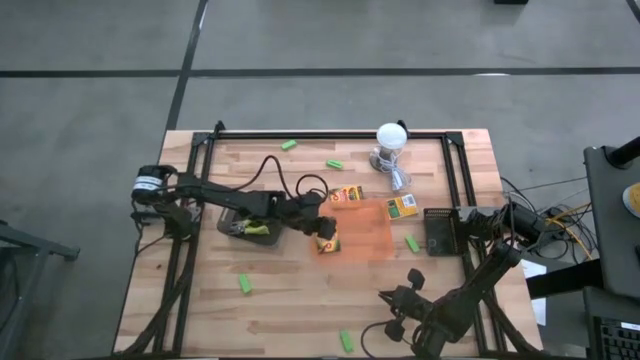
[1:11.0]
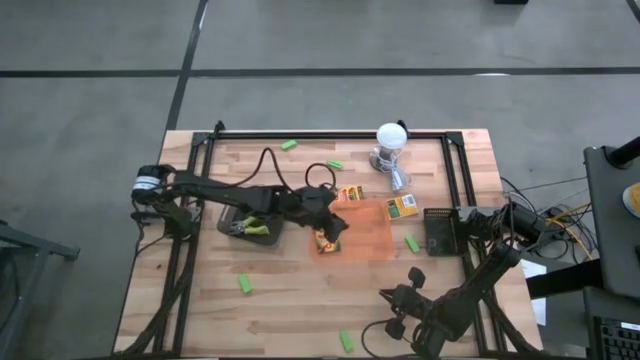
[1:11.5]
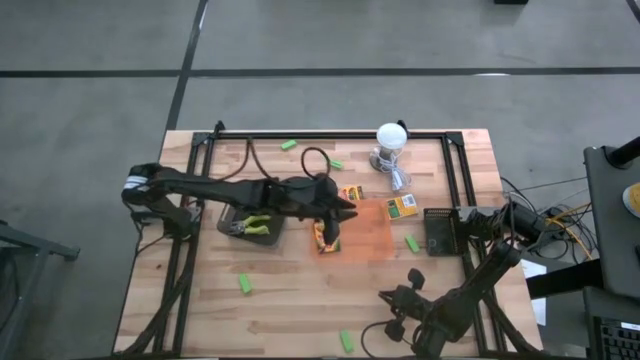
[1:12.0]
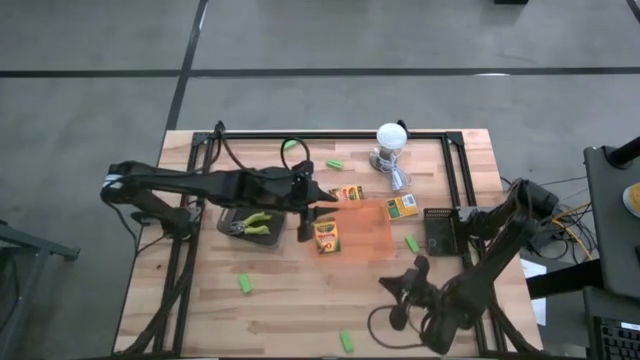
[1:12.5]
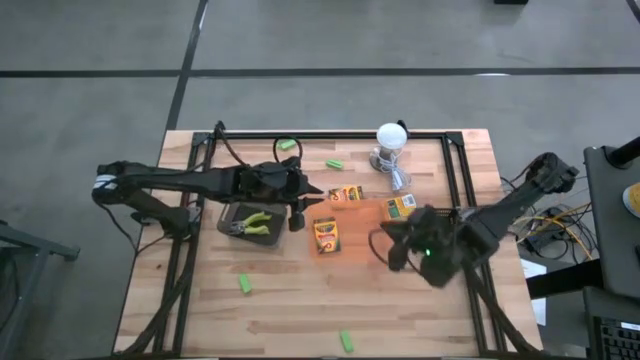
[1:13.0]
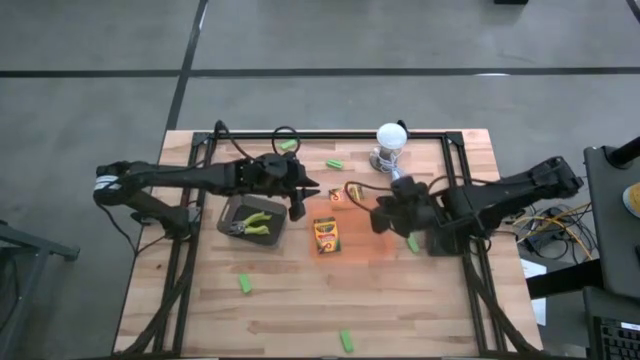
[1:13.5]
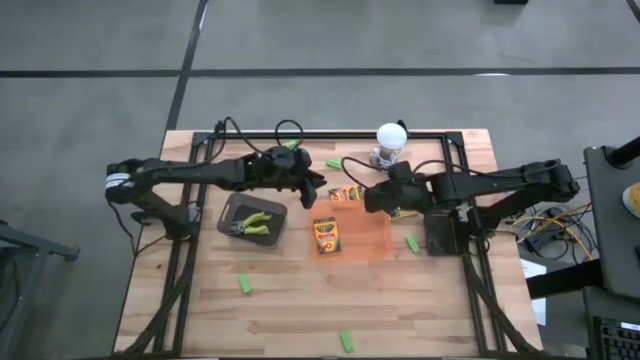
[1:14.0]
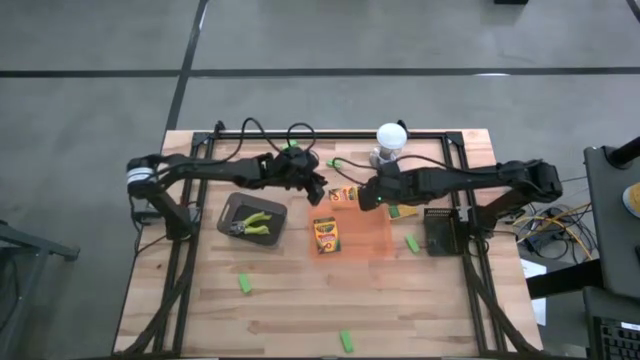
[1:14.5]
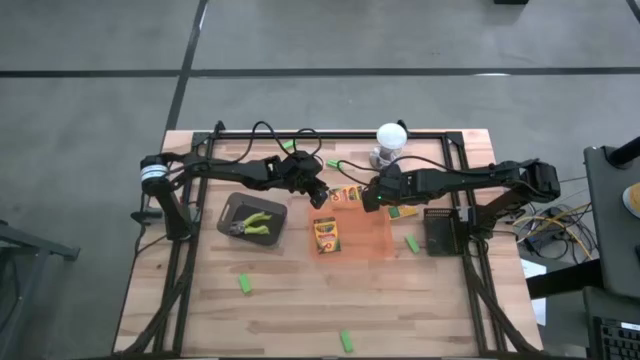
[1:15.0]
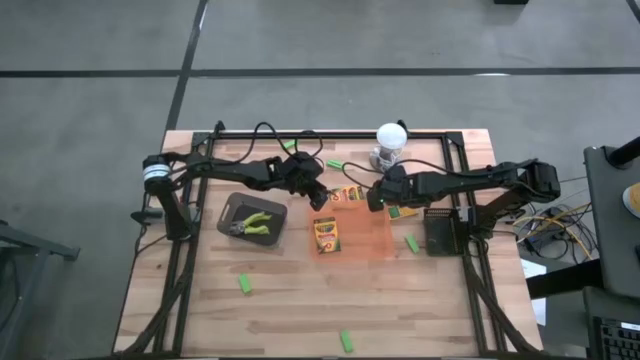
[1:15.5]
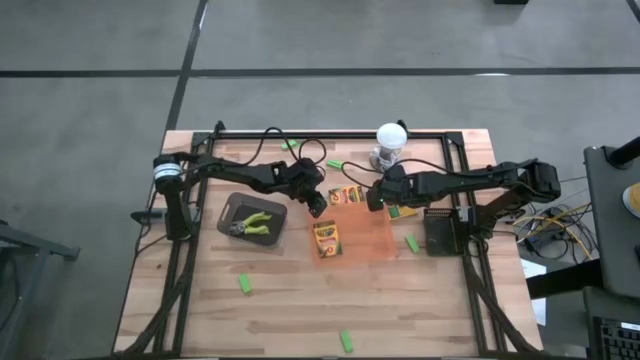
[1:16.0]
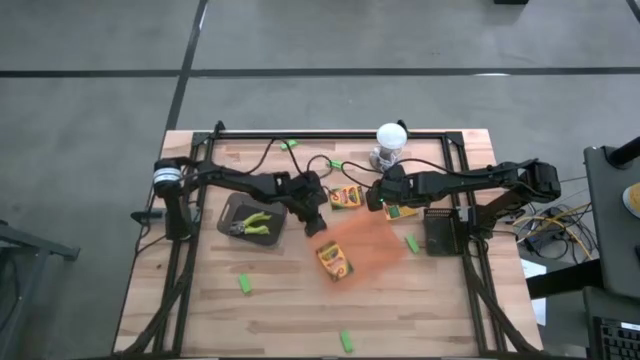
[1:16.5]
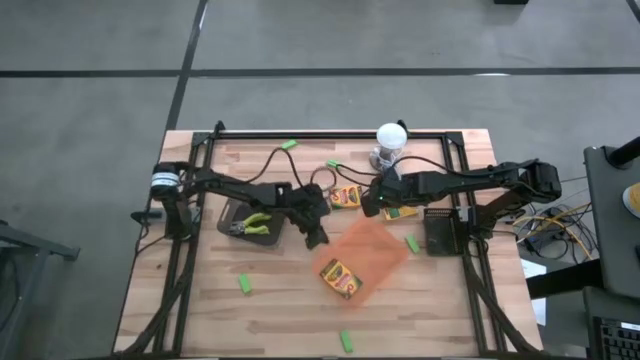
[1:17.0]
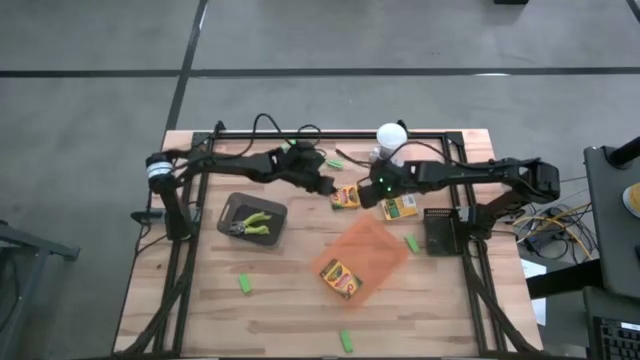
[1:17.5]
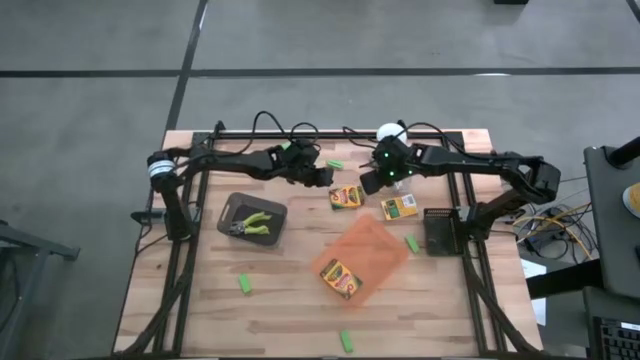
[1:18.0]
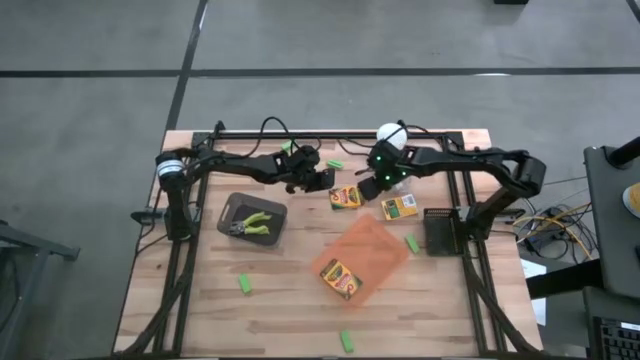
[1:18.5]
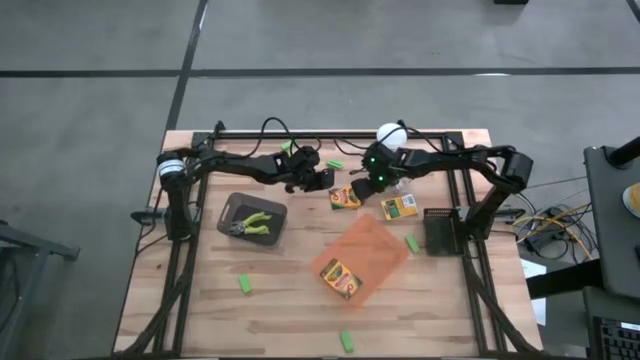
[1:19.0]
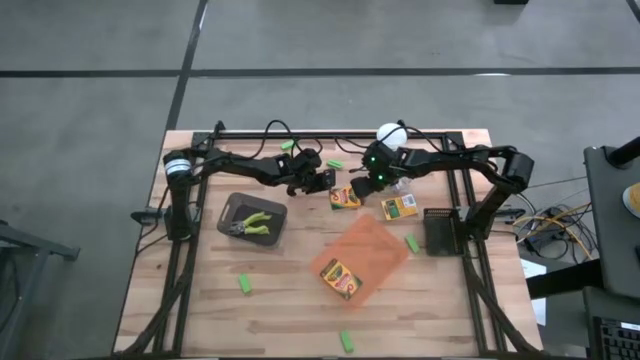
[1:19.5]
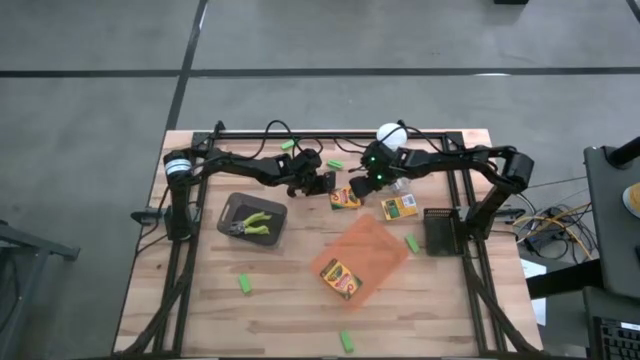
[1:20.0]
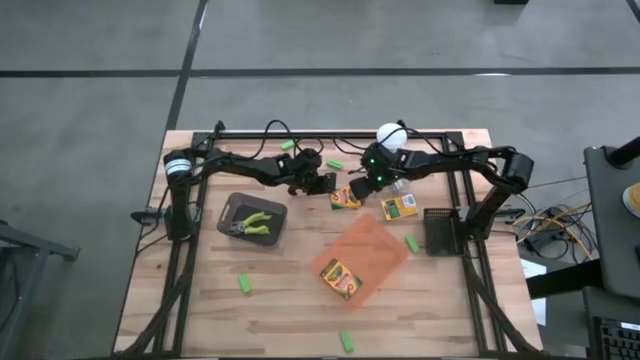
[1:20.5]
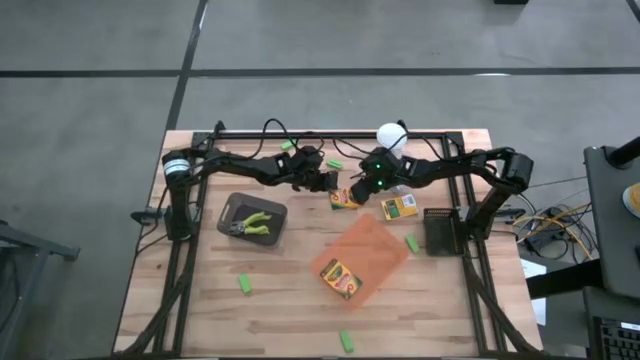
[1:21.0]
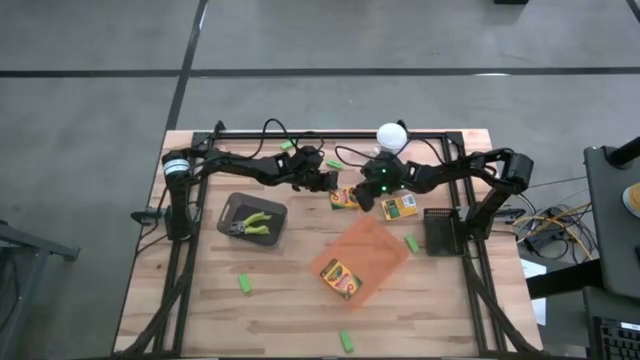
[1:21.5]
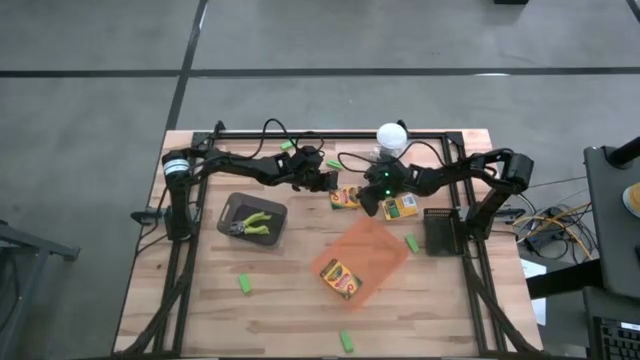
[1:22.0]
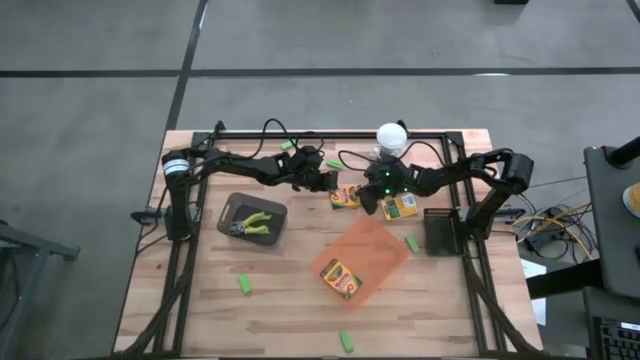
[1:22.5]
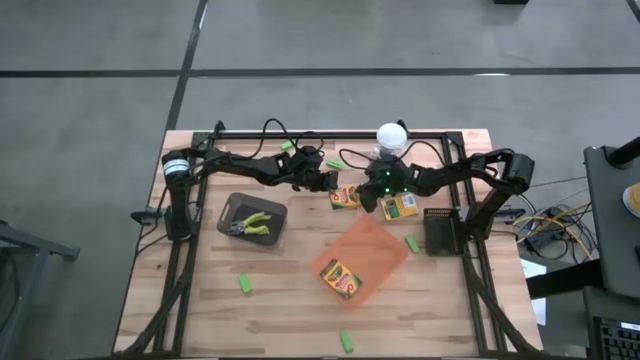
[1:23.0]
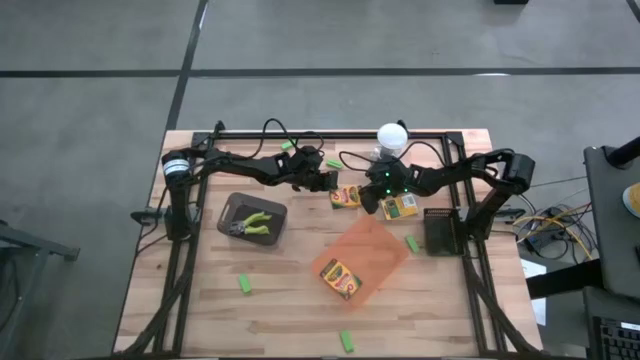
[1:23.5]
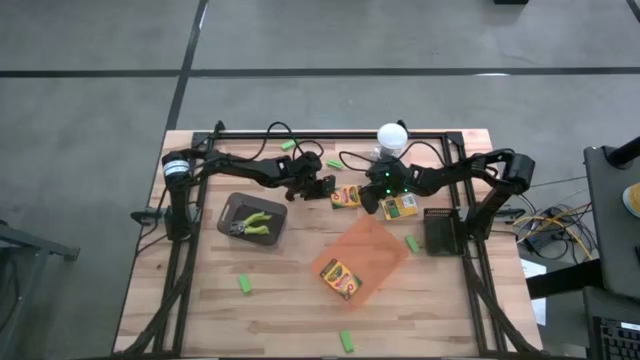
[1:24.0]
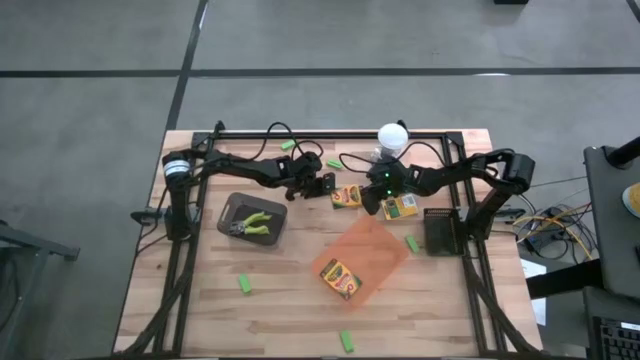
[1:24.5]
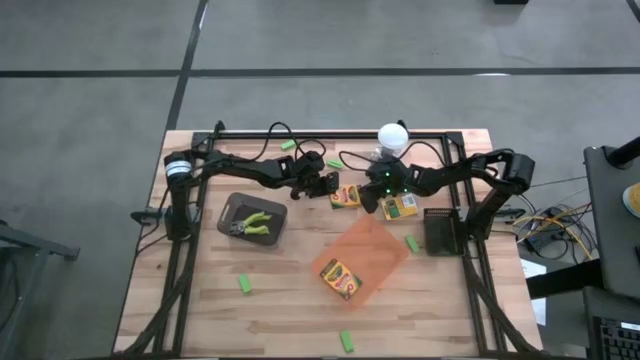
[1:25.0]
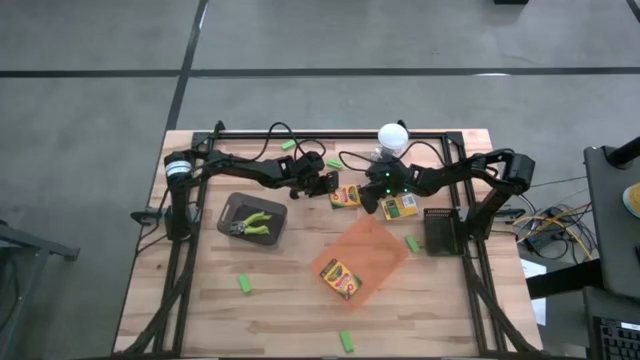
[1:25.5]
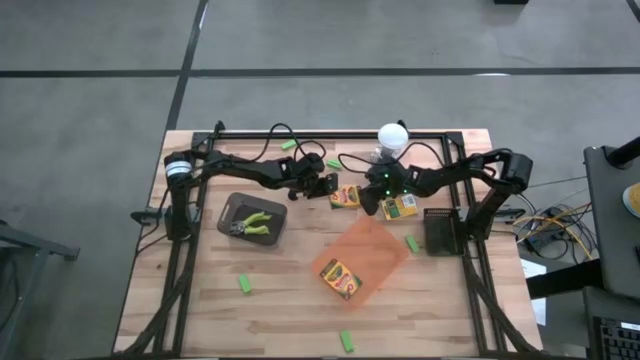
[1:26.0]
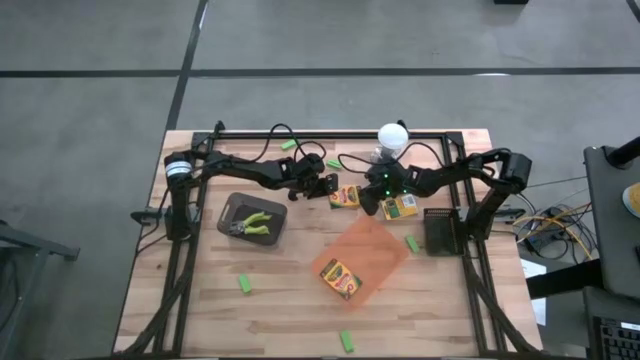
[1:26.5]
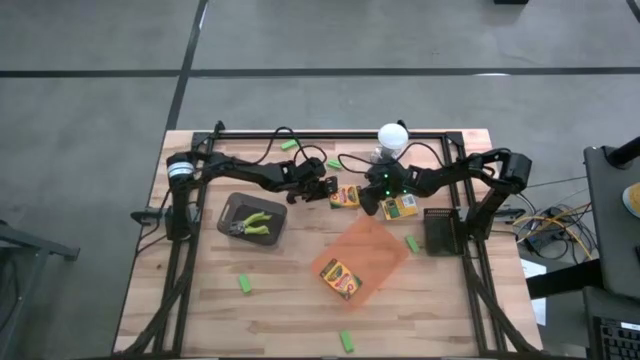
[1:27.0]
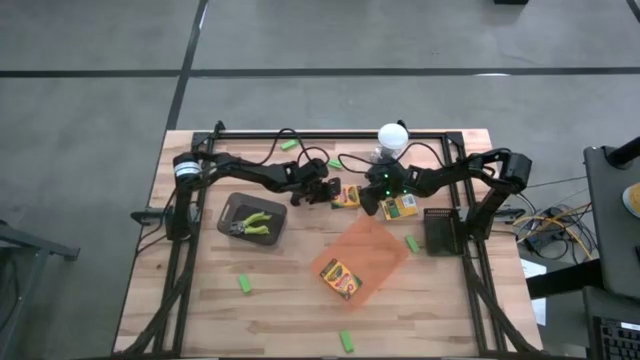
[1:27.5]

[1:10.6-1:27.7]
Task: Pick & Place School Supplies
Put the left crayon box into the orange bin

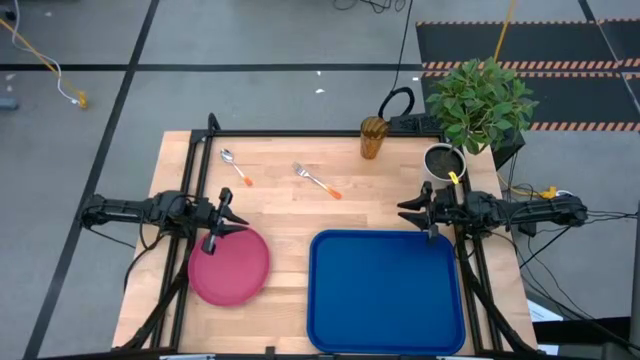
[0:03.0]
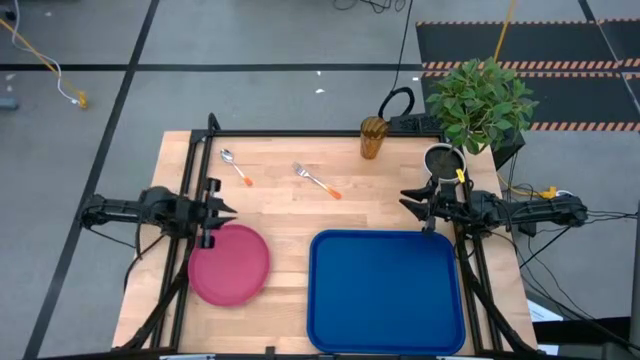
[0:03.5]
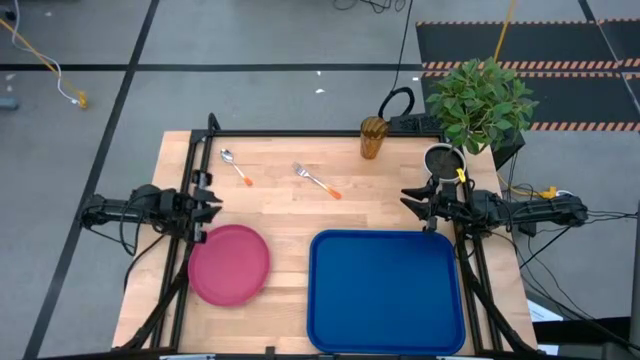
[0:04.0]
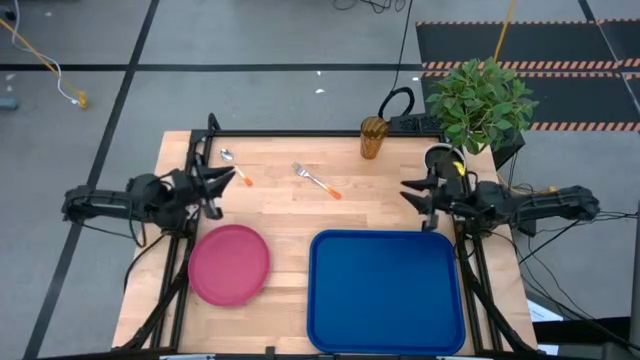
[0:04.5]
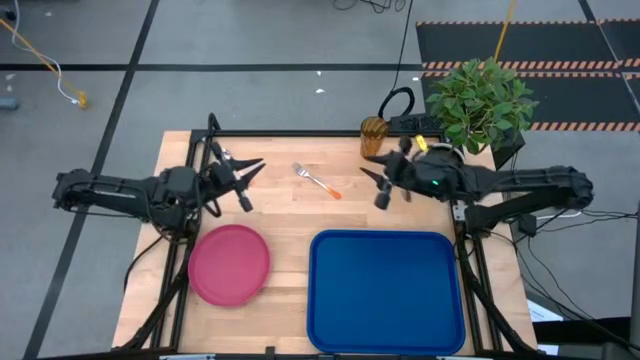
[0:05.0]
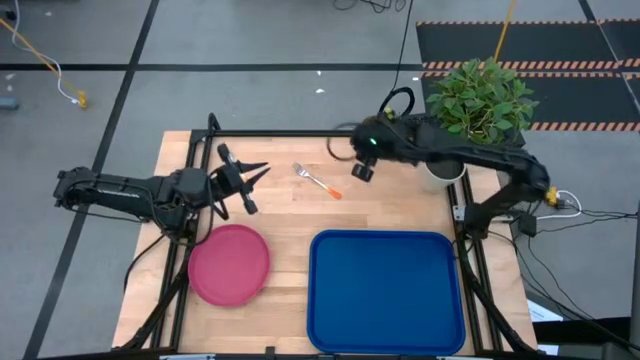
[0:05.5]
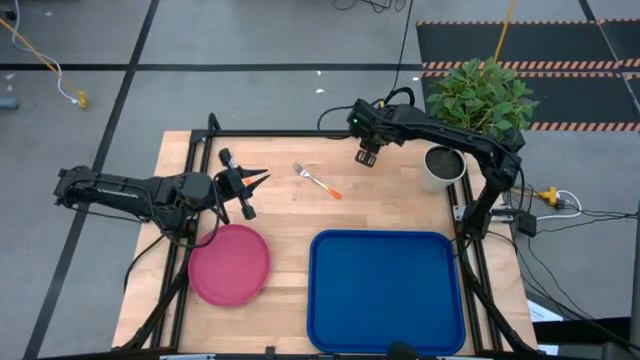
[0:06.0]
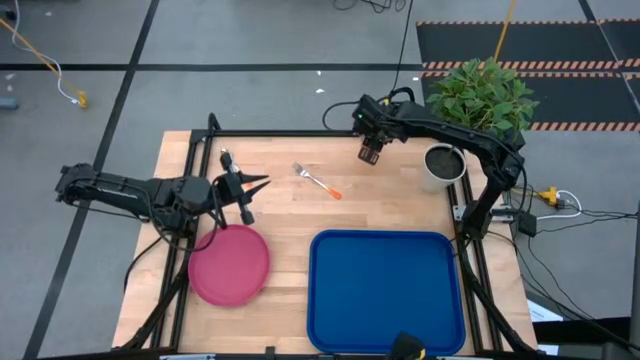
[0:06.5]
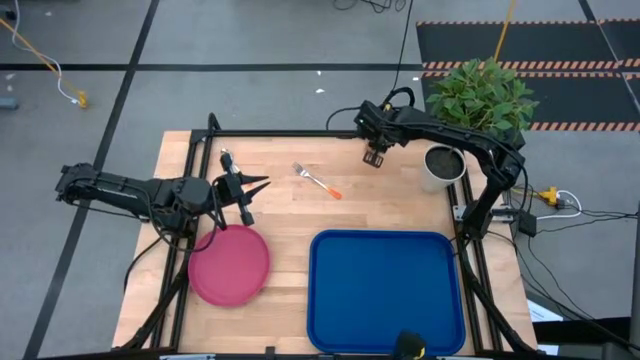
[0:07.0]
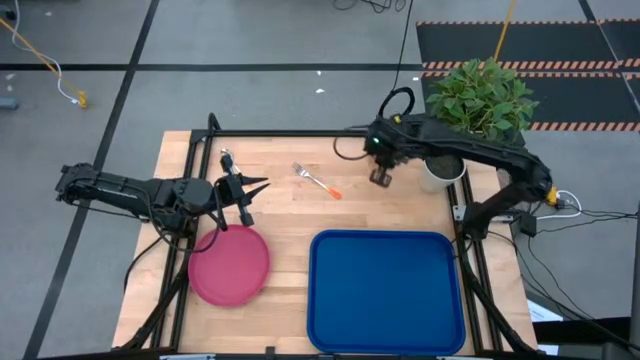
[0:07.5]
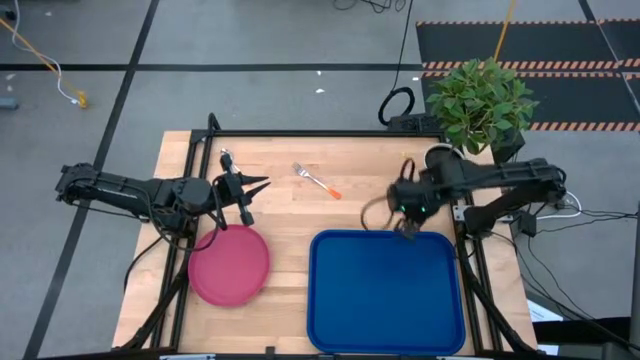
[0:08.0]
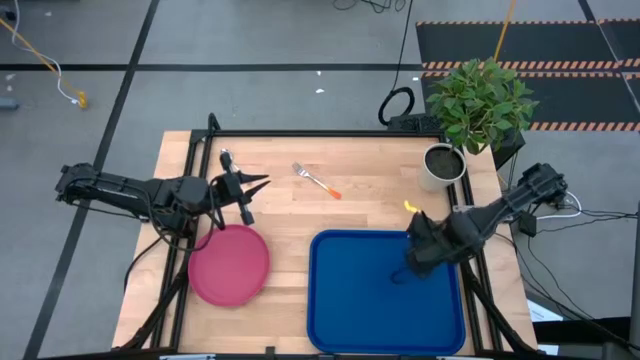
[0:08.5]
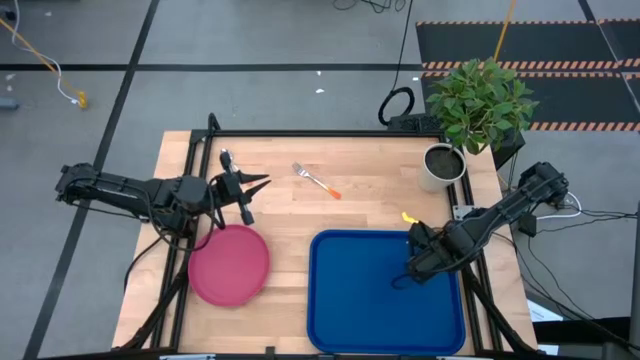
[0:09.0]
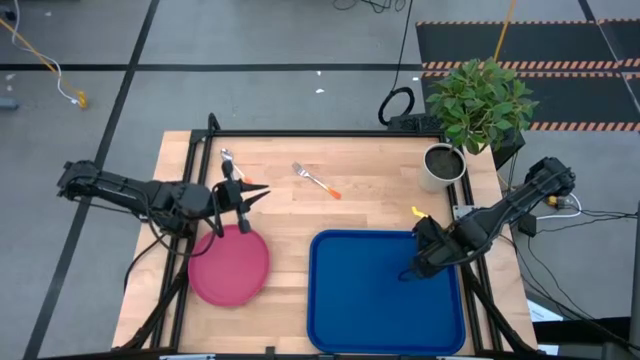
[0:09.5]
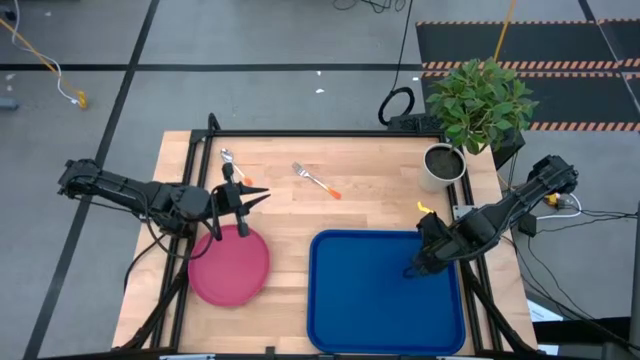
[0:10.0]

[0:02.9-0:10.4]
Task: Pick and place plate/cup/fork/spoon on tray
Put the brown cup on the blue tray
